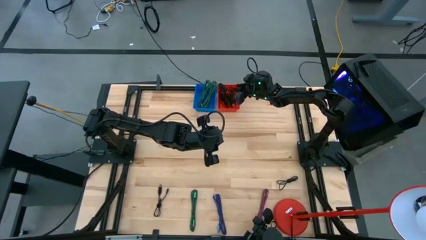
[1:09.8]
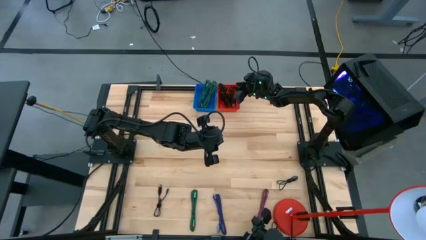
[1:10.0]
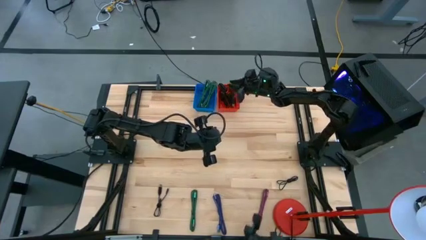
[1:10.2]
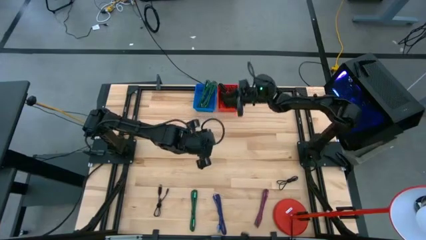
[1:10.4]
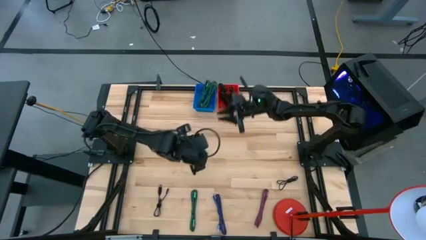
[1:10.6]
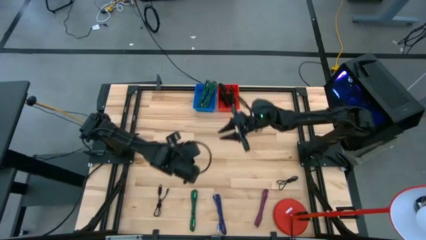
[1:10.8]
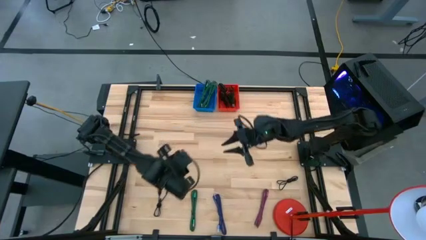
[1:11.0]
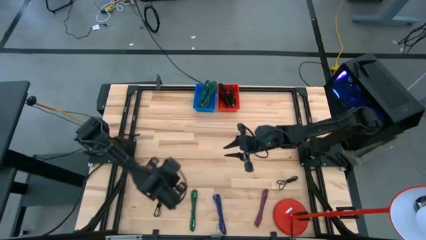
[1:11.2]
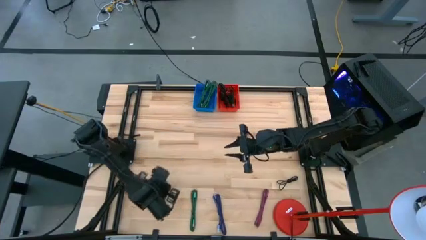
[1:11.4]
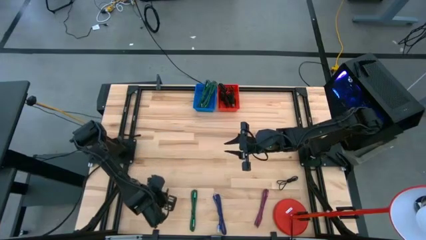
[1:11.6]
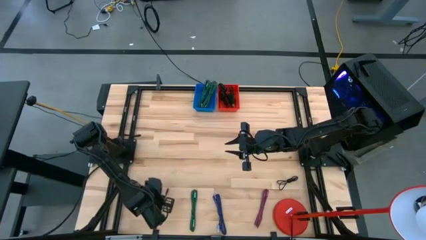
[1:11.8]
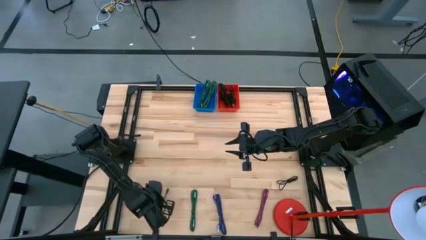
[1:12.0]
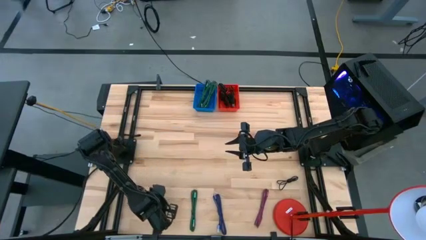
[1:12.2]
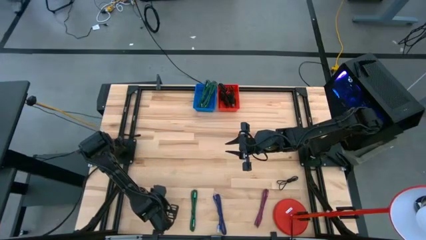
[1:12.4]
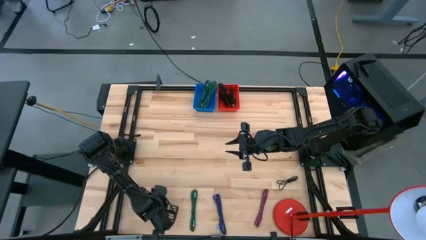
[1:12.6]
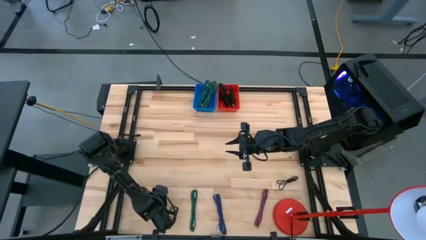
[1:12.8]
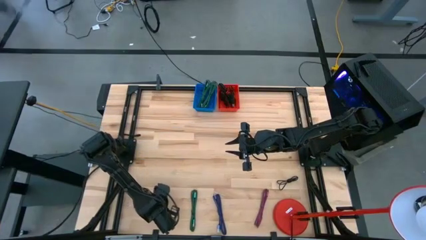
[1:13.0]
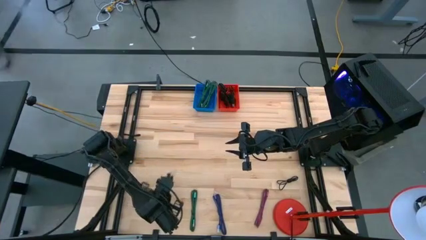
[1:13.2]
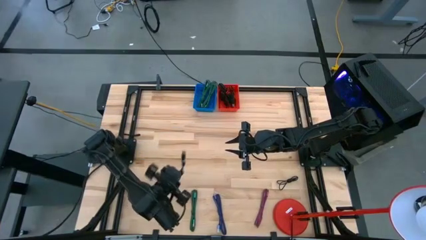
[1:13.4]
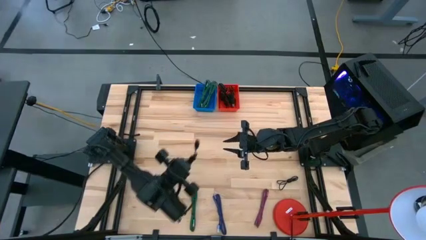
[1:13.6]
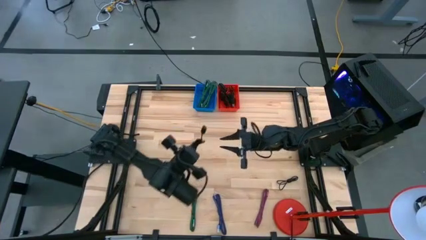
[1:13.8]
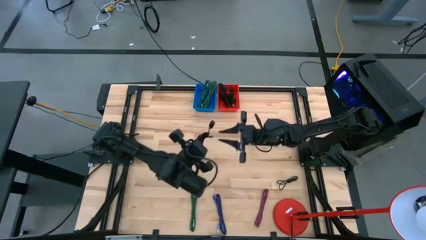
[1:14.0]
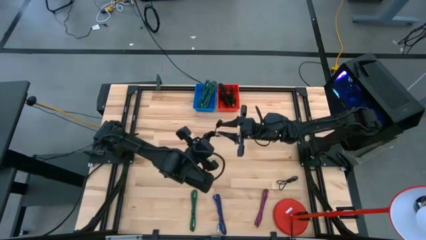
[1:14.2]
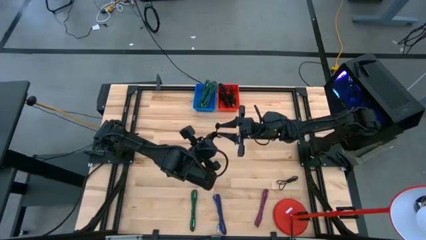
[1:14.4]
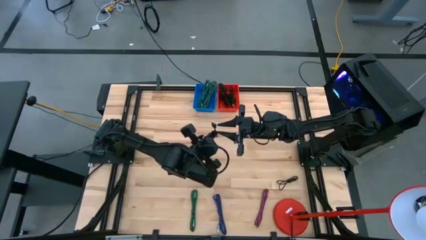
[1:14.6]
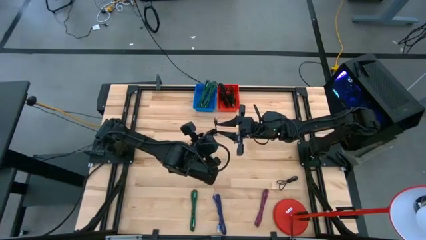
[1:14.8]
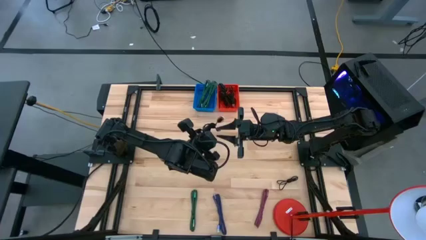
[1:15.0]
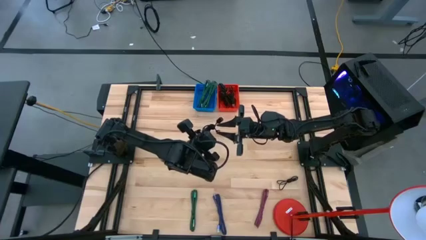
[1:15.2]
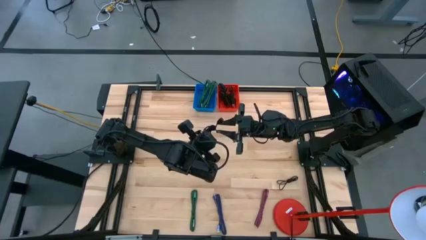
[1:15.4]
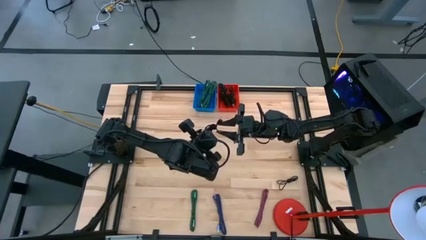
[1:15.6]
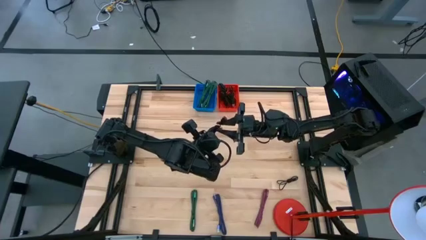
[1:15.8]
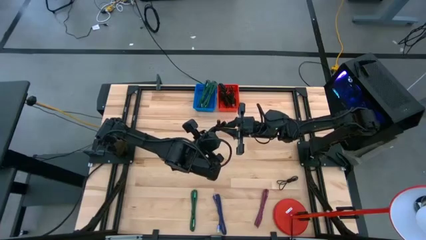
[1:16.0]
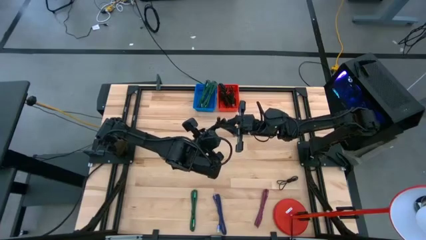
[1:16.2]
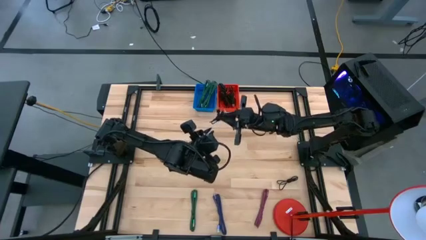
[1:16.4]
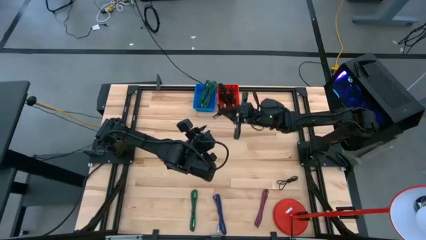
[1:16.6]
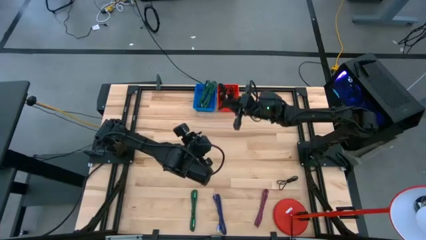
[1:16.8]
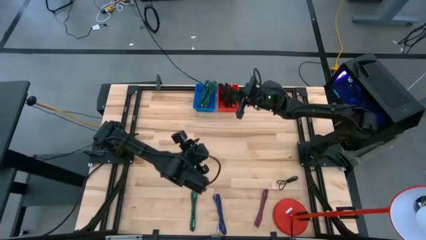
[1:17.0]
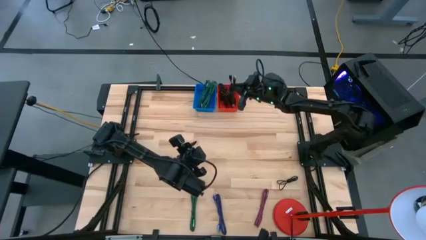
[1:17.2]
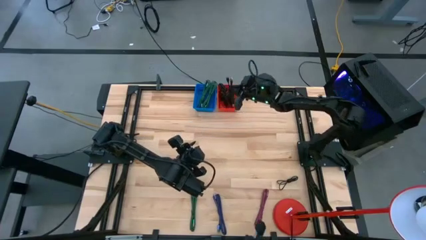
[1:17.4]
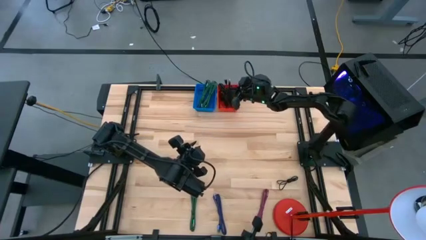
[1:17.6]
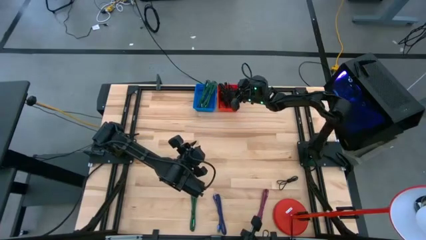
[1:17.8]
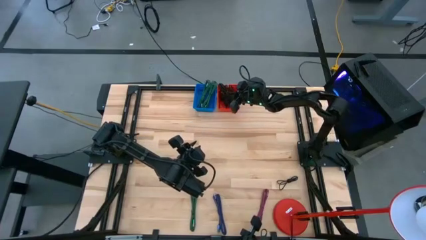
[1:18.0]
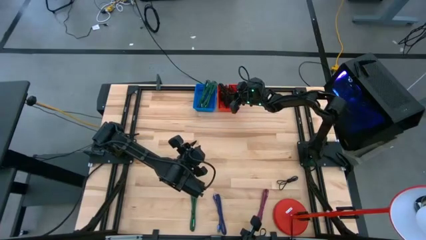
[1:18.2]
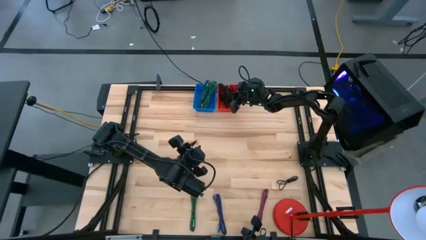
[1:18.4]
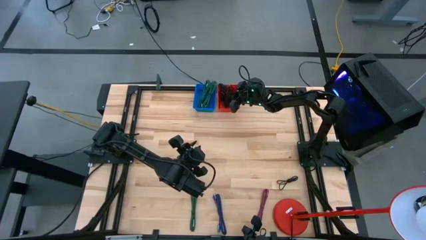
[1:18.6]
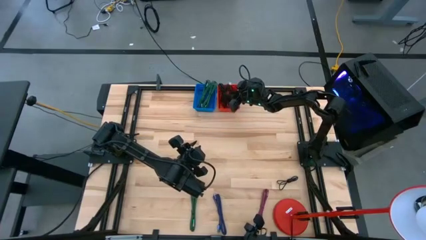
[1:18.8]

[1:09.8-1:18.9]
Task: Pick & Place USB Port
Put the black charger cable into the red bin

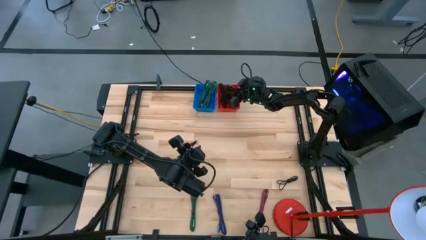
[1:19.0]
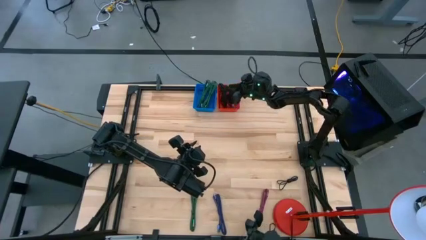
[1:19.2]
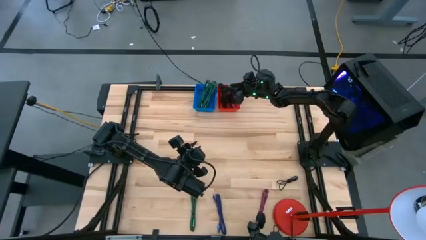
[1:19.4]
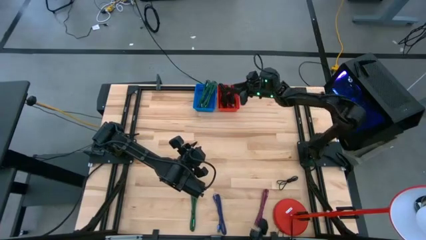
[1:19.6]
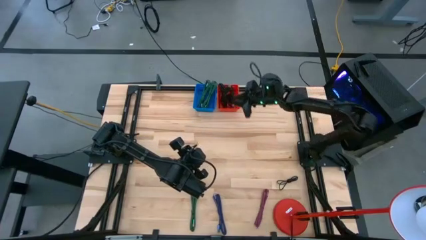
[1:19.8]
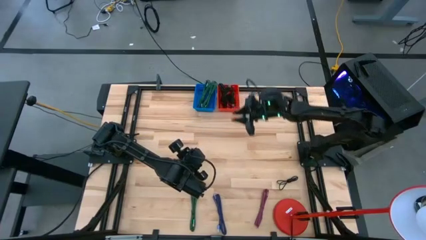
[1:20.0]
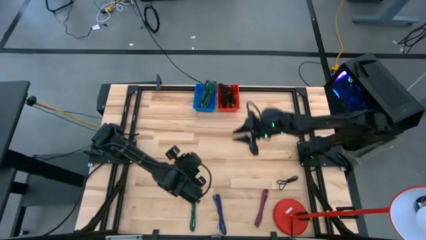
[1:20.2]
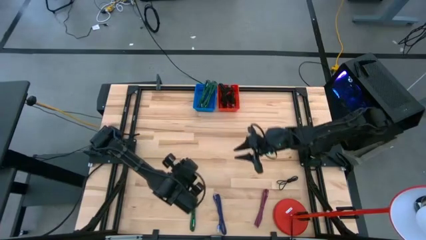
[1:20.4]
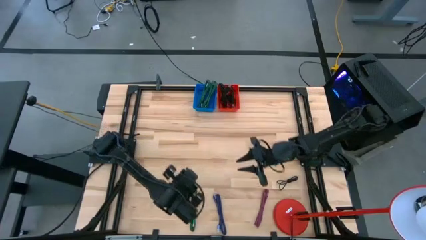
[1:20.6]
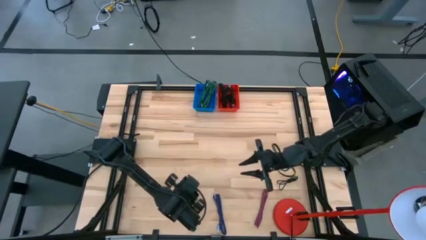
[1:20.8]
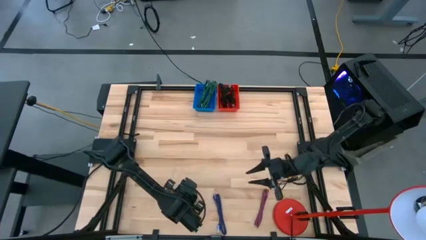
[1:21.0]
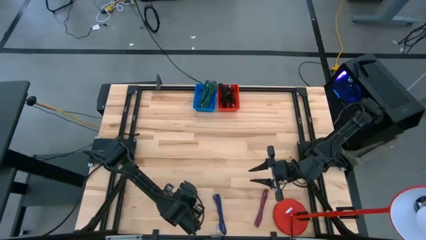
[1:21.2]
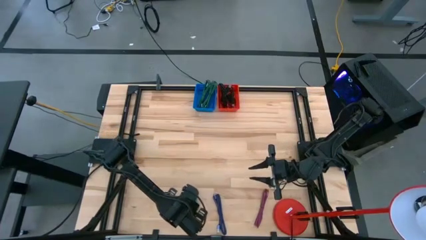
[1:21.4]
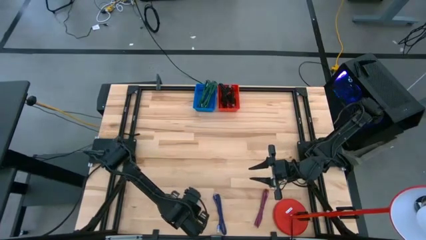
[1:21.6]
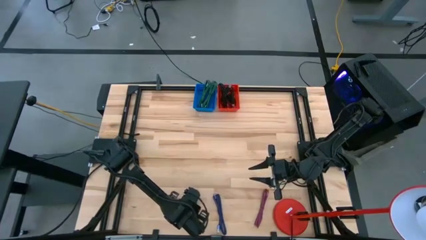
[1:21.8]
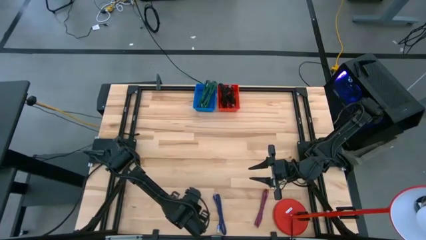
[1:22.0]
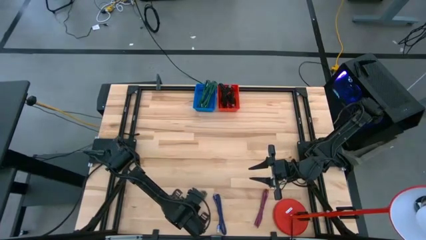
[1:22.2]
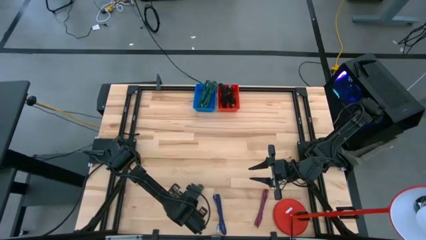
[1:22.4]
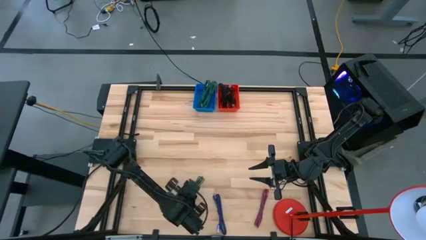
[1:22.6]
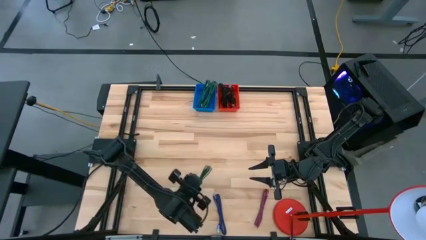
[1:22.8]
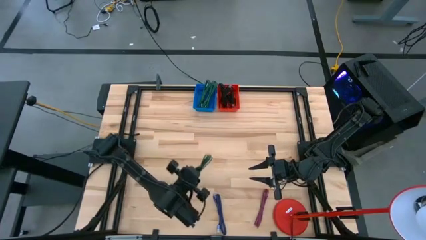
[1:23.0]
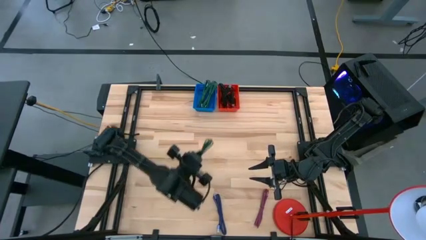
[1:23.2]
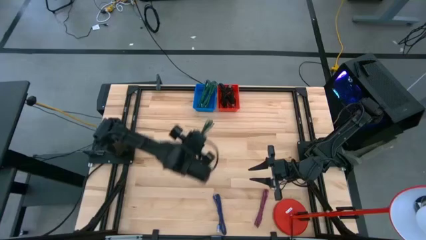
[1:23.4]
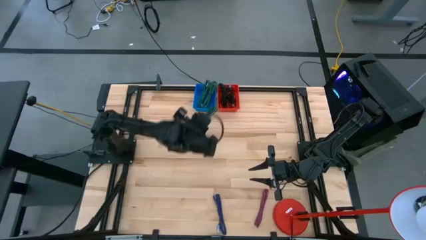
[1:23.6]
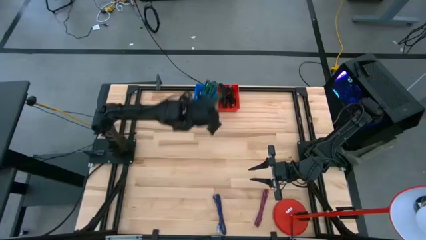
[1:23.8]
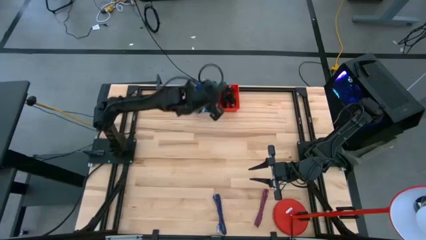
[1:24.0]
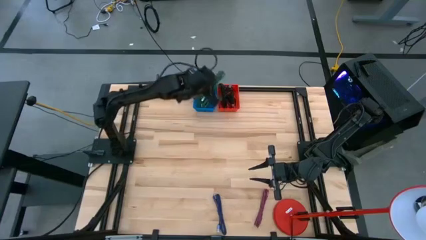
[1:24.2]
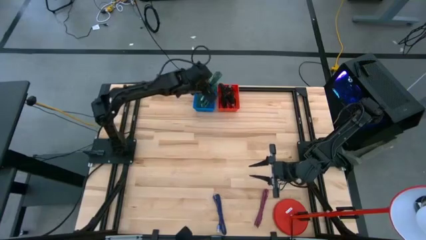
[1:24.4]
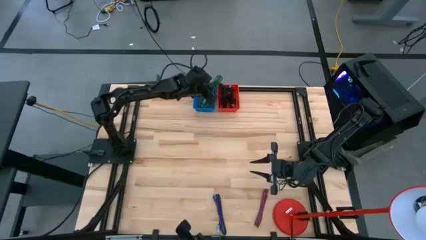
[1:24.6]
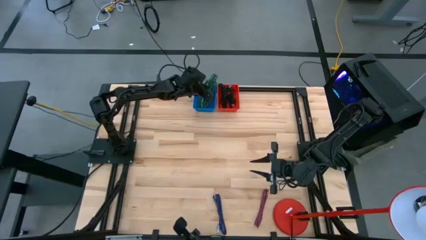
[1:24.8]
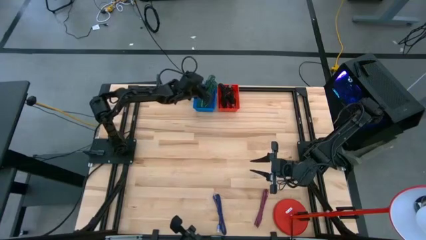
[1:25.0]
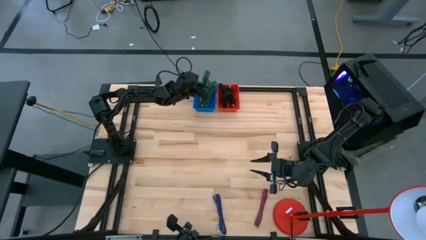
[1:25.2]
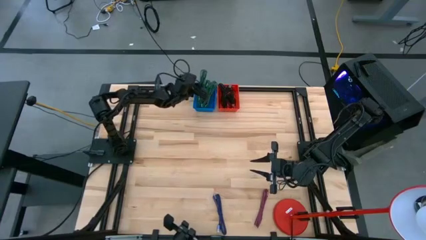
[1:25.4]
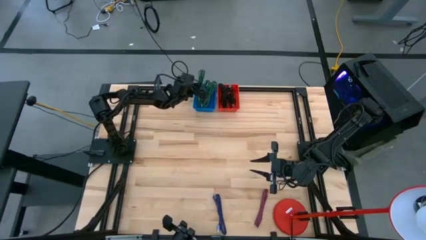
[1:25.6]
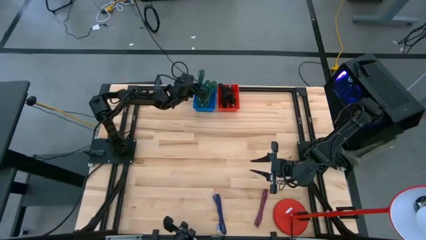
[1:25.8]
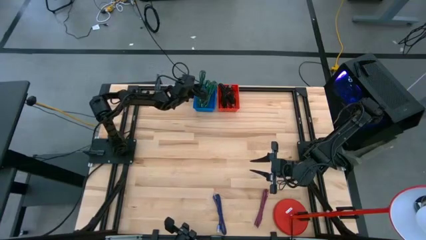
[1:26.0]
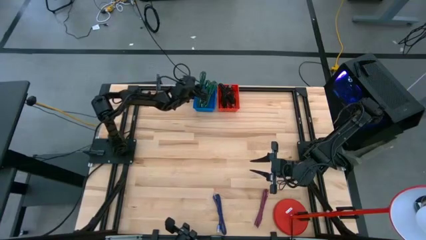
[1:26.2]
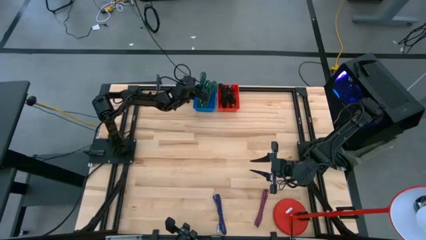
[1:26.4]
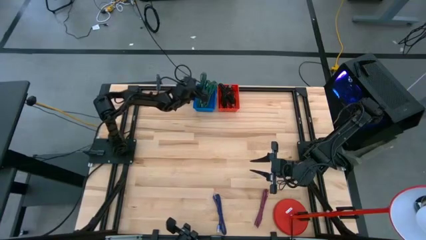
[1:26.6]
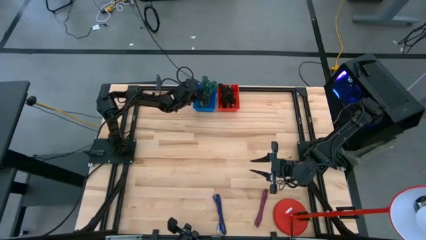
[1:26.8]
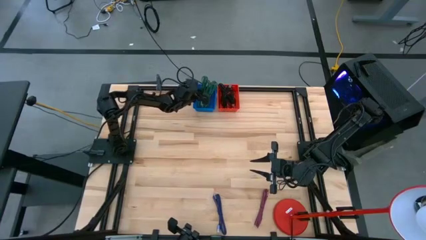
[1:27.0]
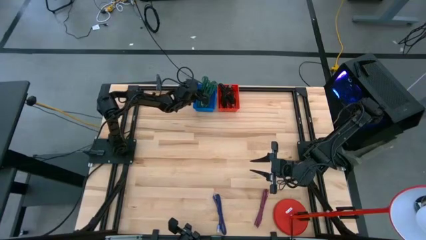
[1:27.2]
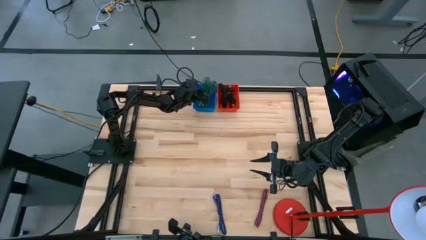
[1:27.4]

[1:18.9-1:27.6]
Put the green charger cable into the blue bin
